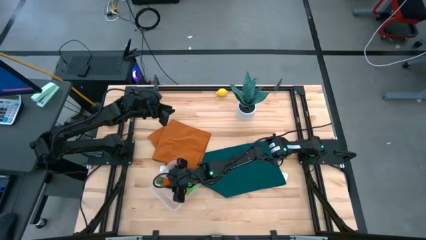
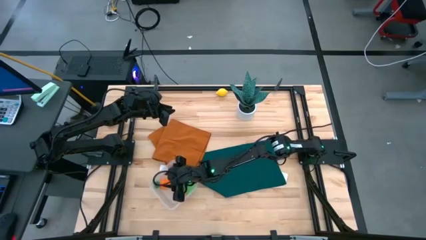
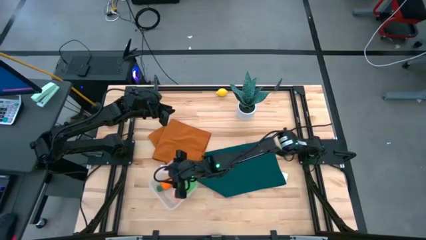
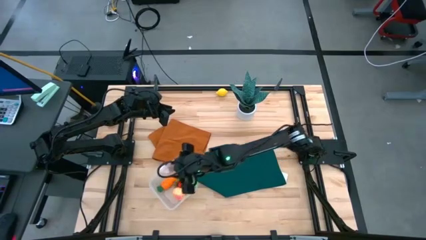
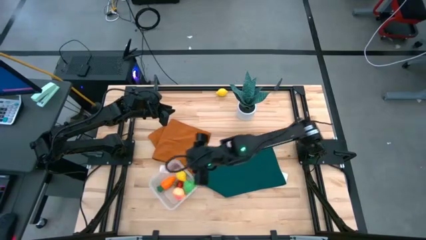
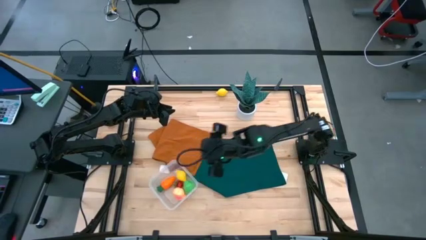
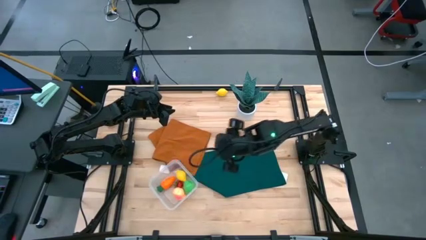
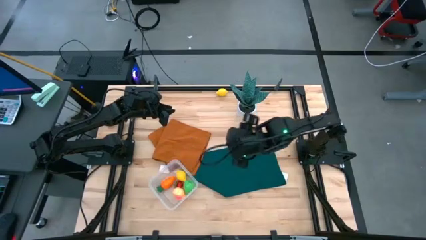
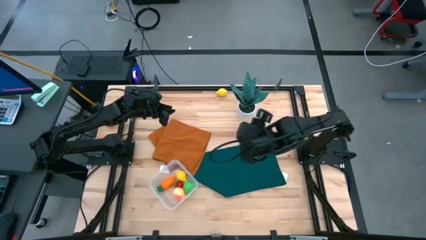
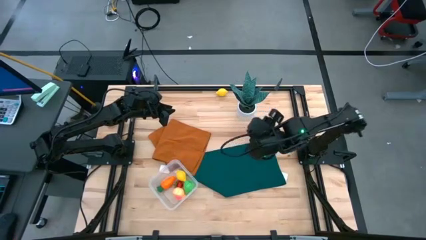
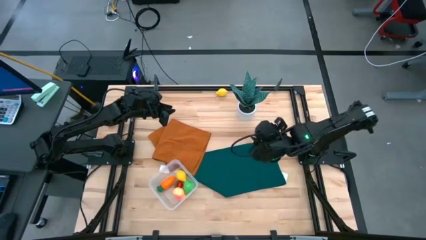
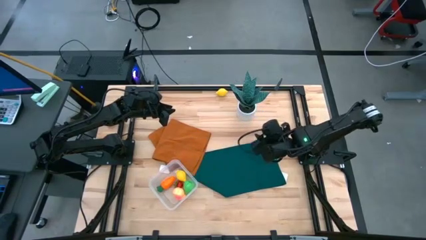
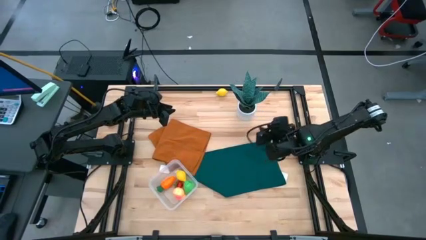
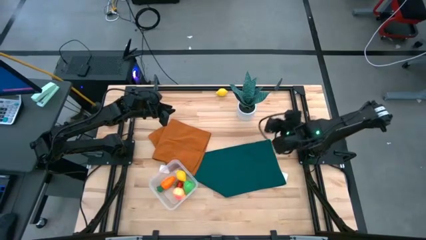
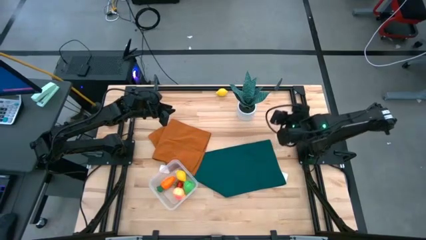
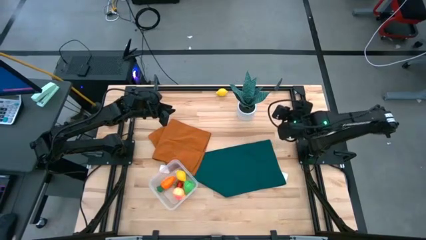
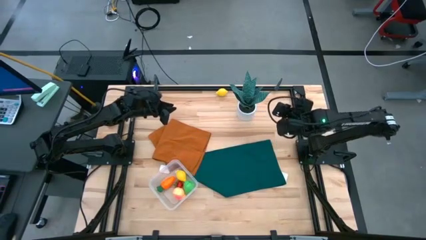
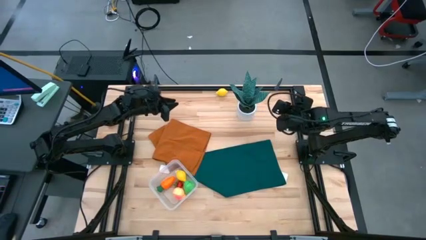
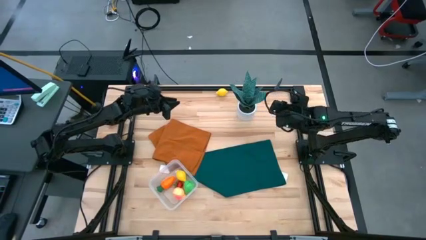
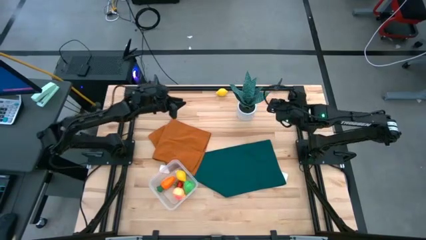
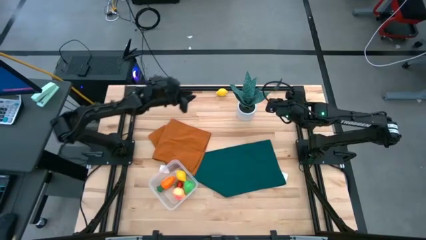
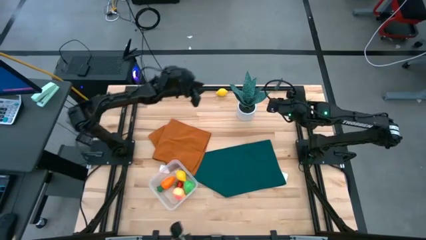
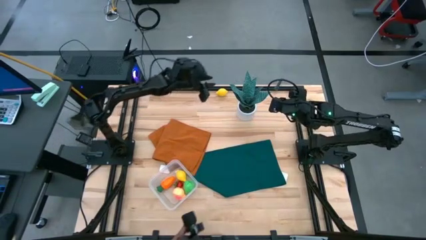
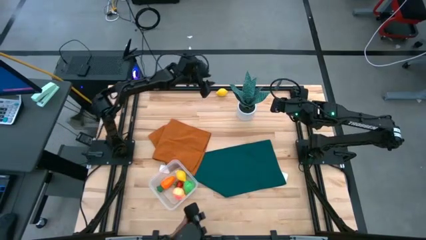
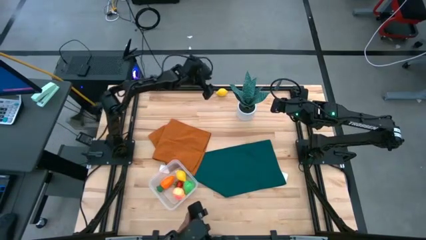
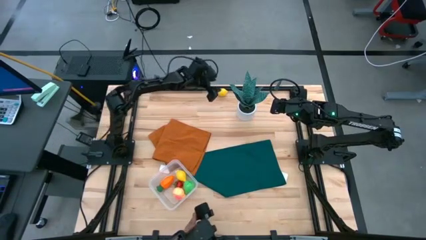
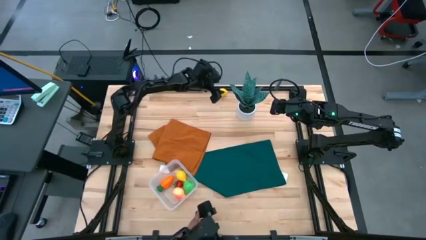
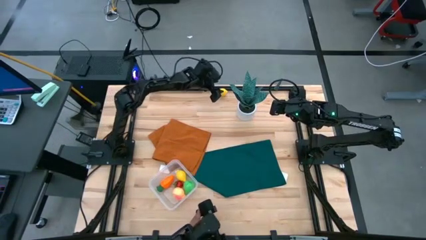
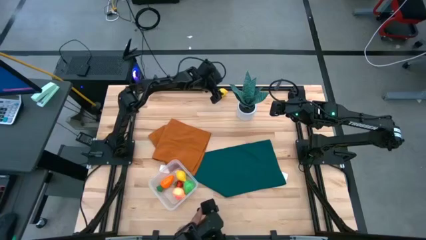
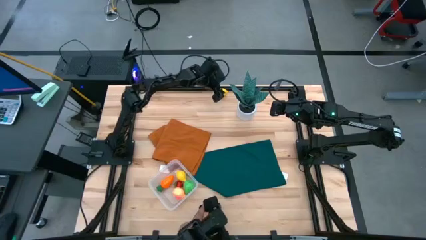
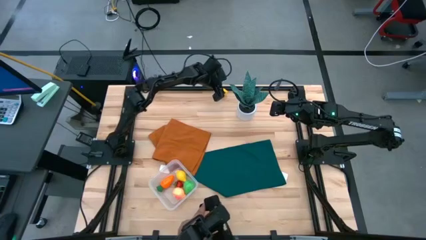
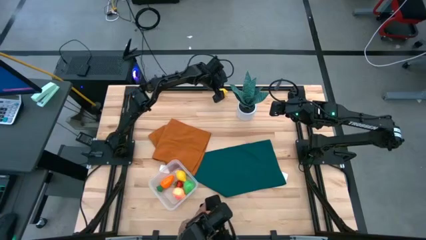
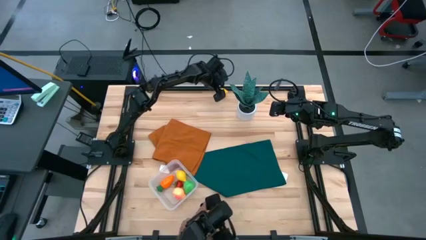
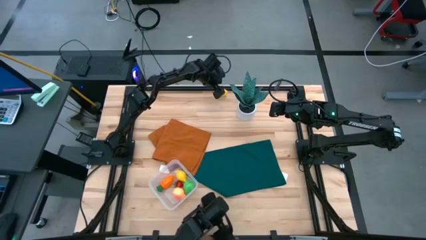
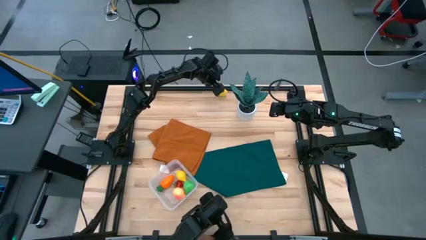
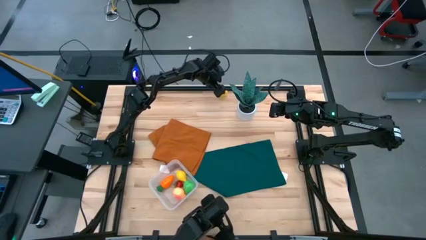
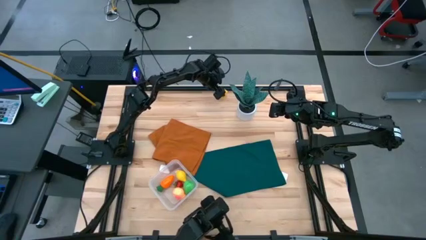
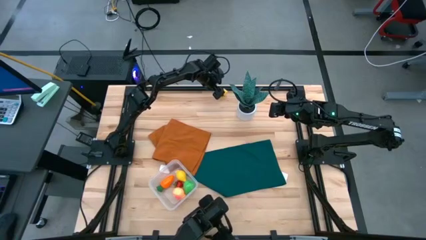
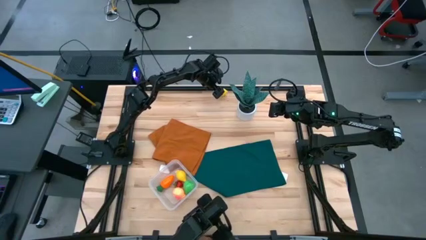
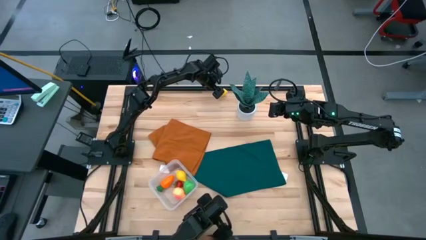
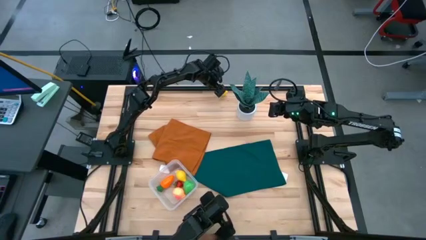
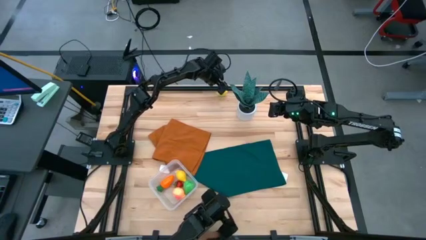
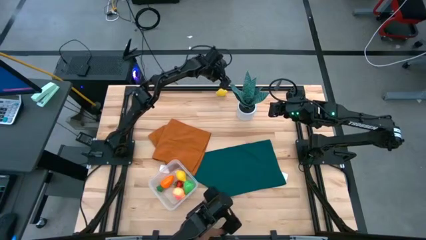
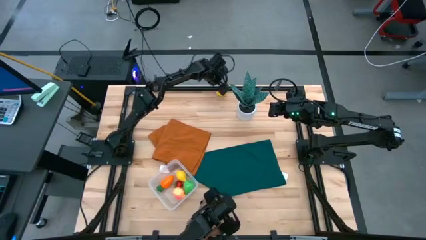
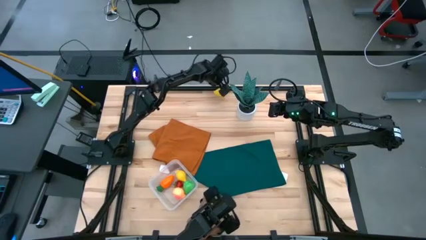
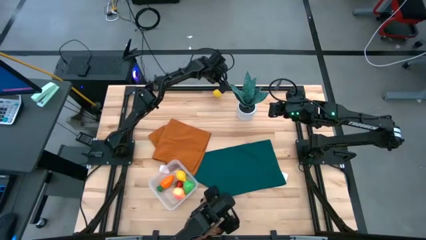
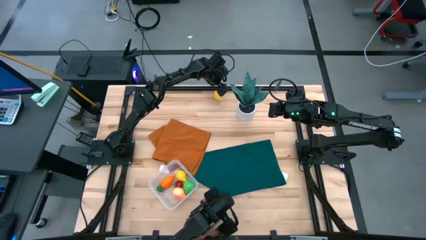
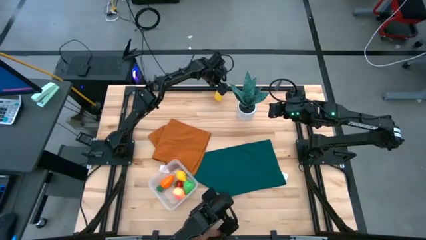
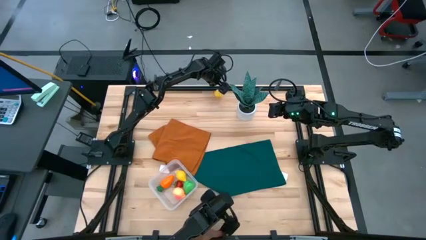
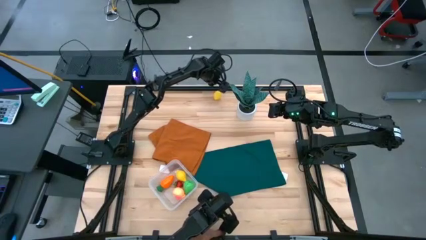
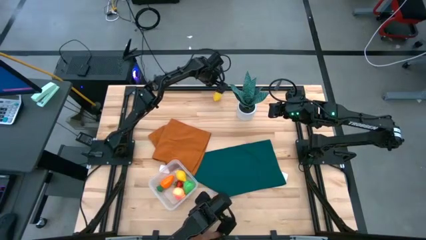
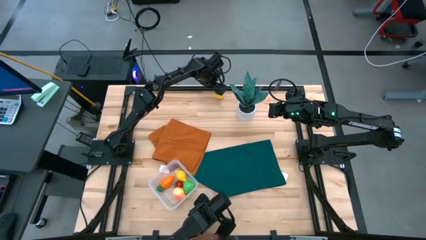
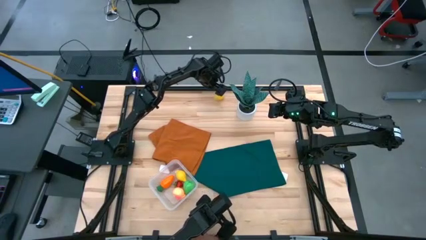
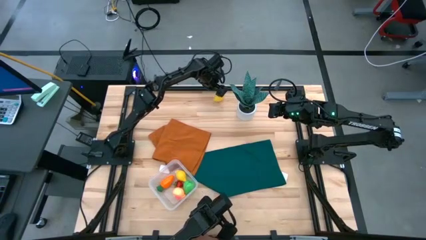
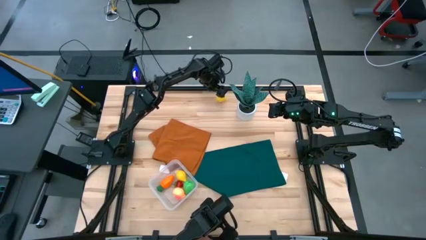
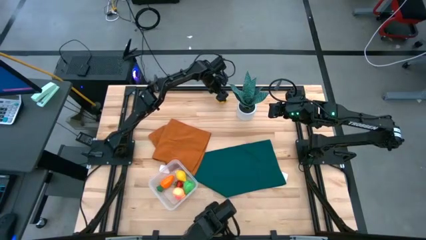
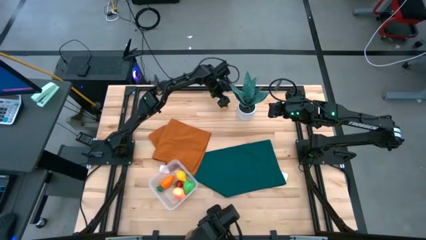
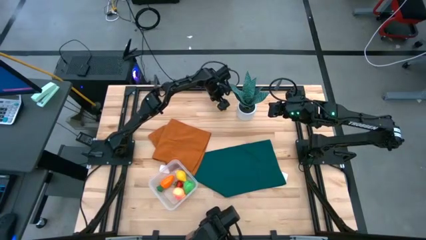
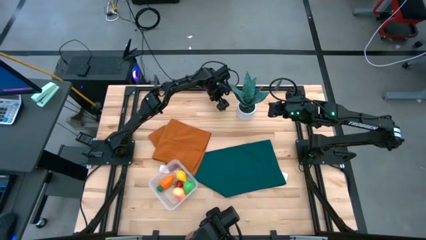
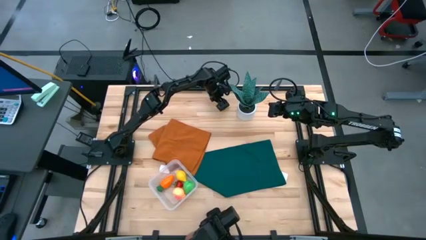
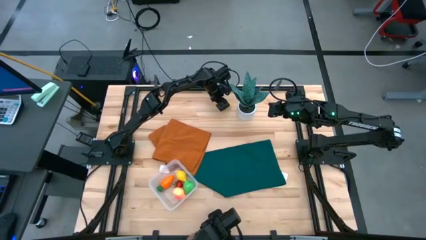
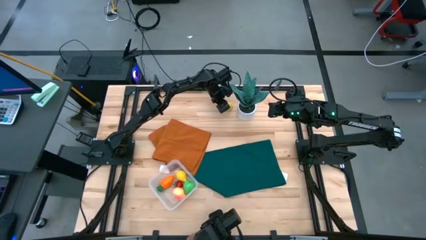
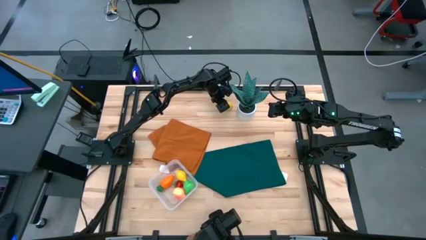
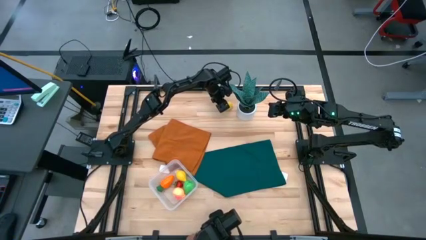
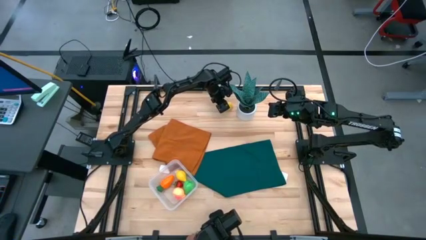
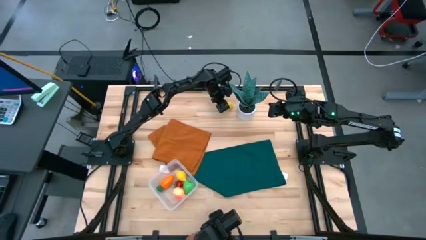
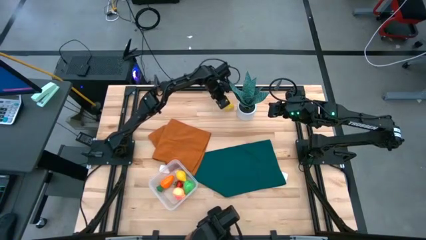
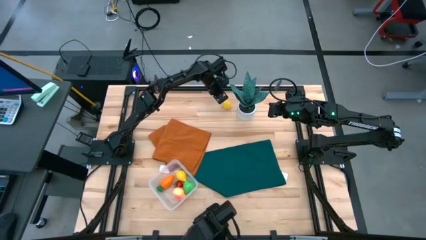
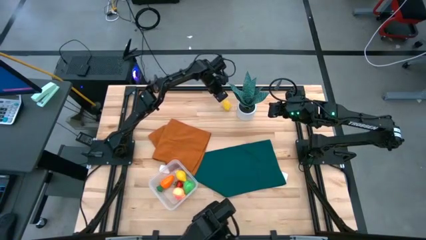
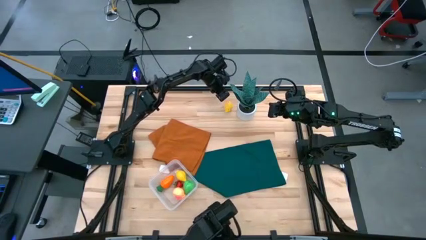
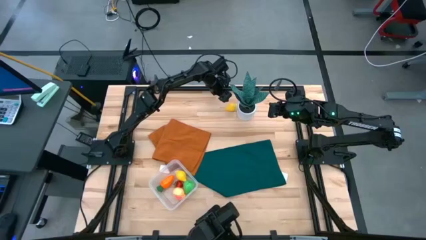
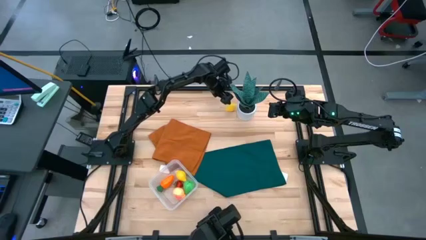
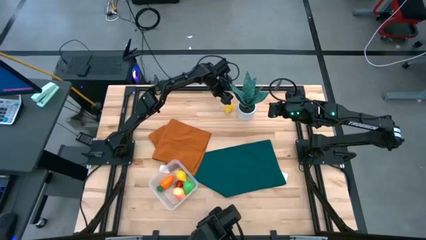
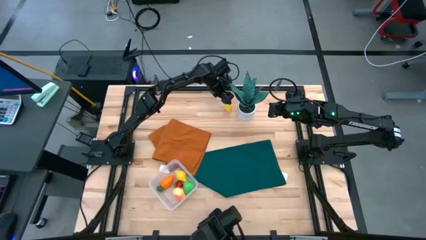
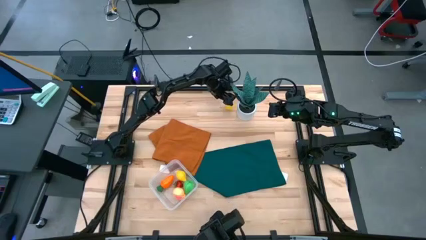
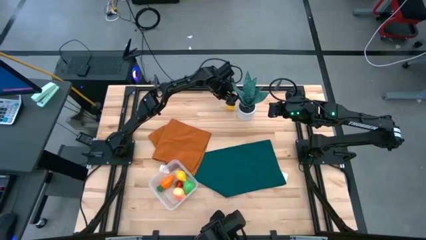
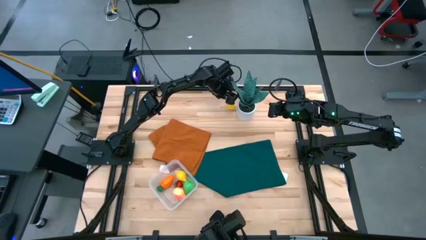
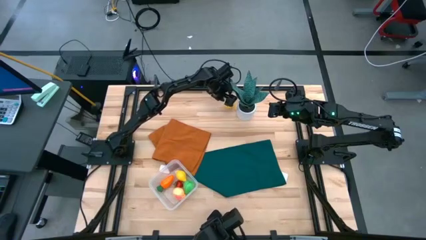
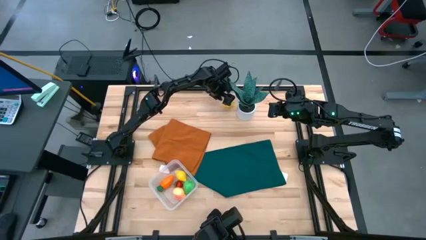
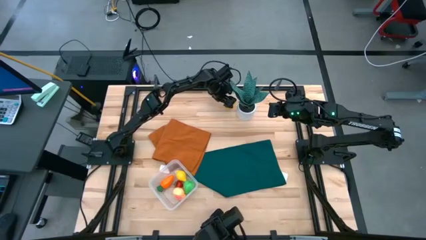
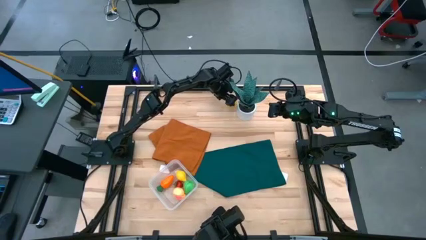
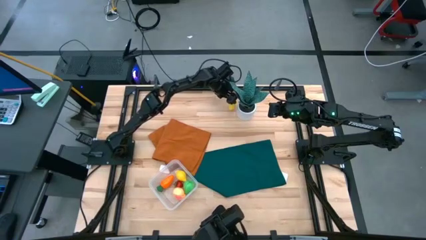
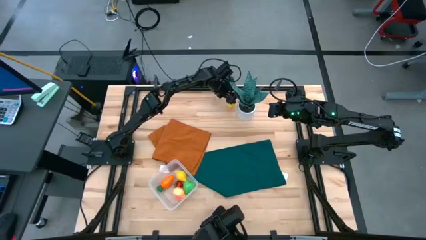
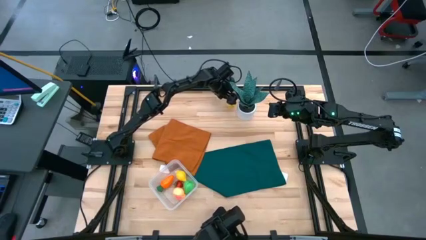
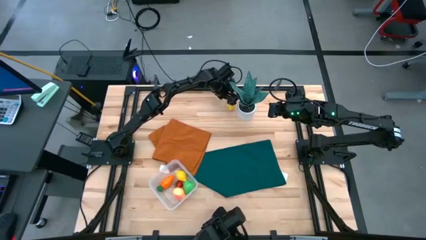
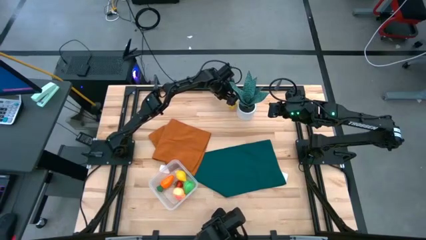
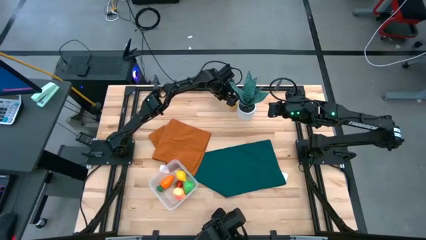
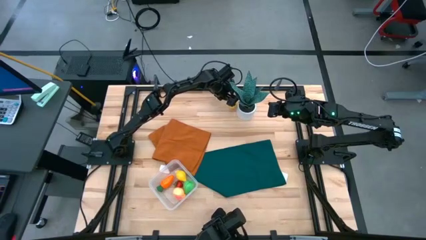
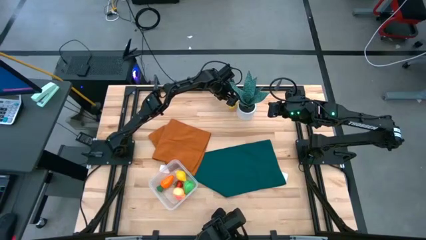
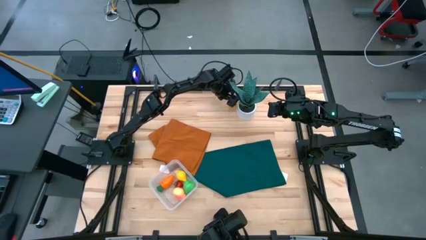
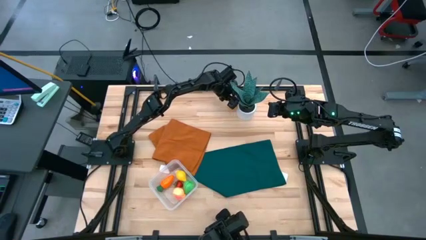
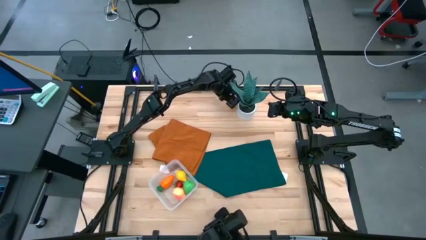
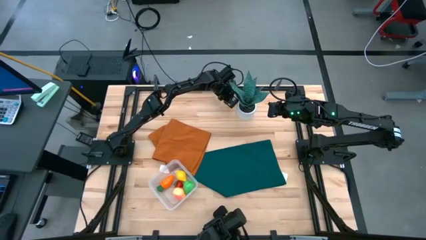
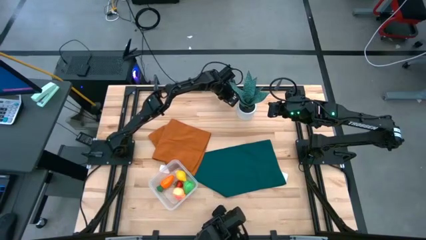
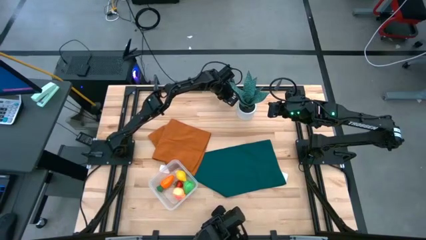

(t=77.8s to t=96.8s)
Task: Pick and placing Produce into tupperware
Put the lemon into the transparent container
